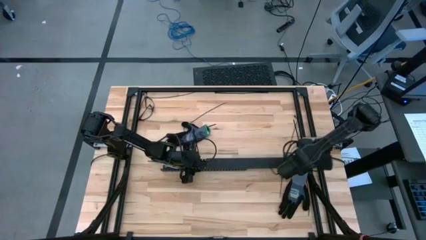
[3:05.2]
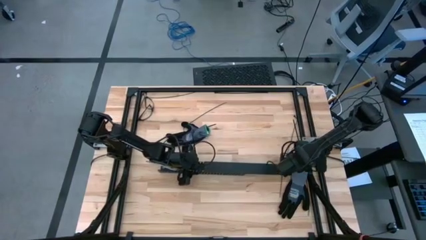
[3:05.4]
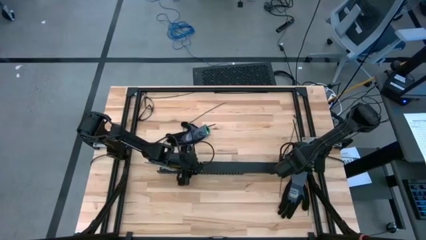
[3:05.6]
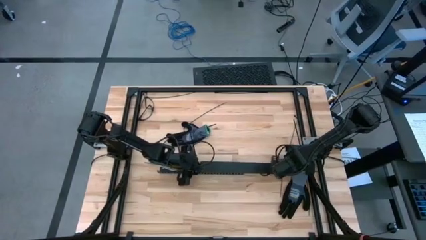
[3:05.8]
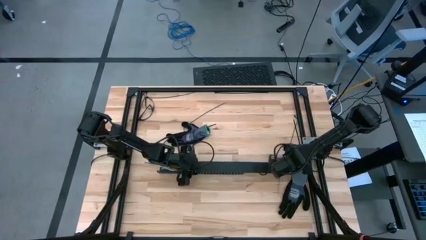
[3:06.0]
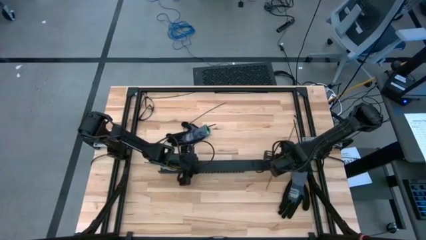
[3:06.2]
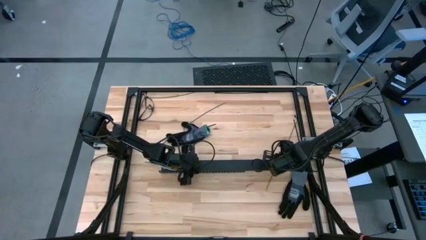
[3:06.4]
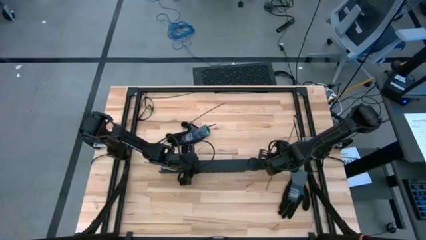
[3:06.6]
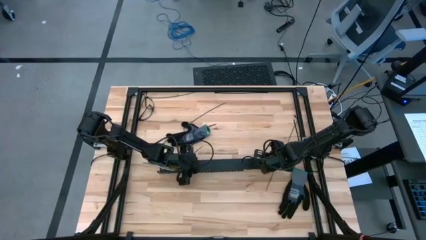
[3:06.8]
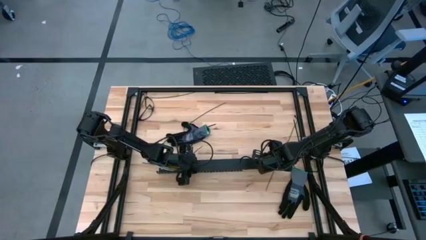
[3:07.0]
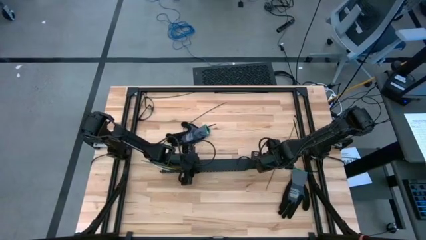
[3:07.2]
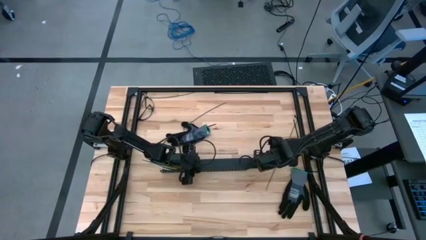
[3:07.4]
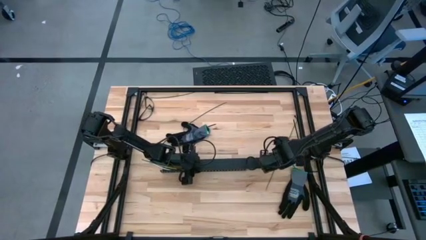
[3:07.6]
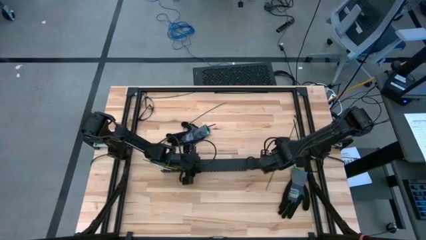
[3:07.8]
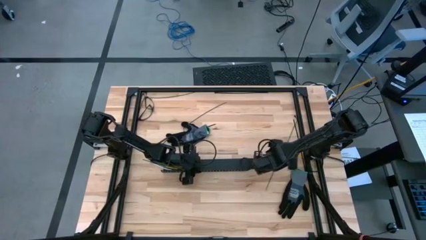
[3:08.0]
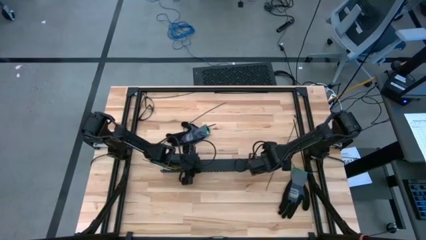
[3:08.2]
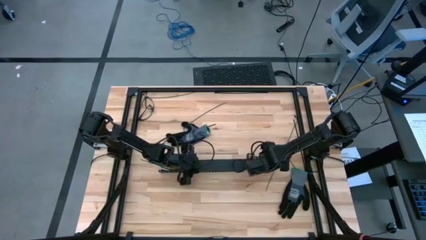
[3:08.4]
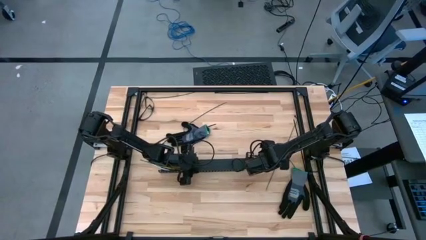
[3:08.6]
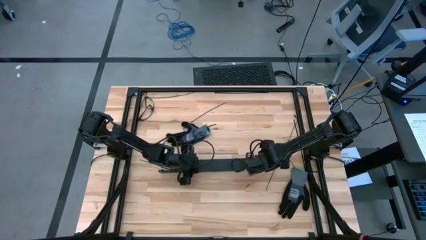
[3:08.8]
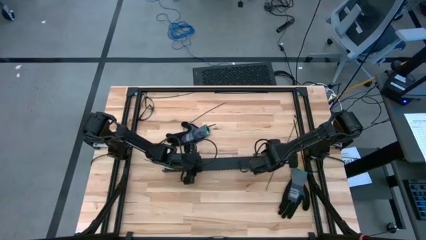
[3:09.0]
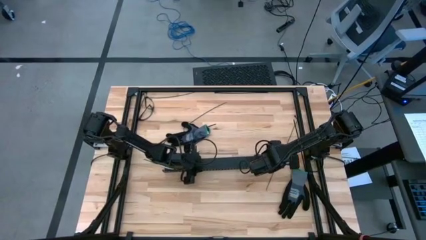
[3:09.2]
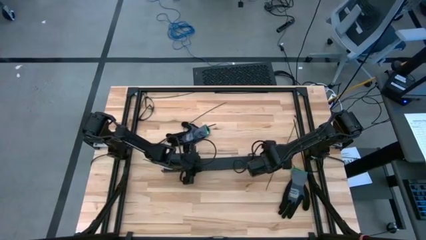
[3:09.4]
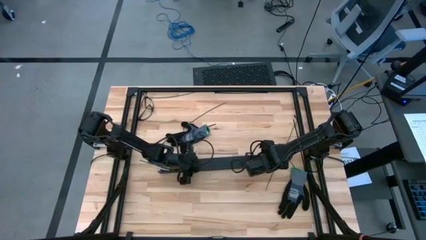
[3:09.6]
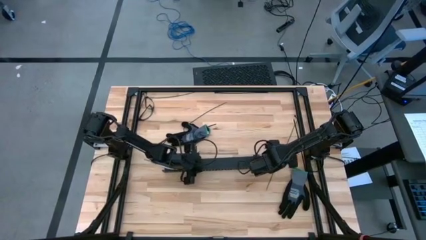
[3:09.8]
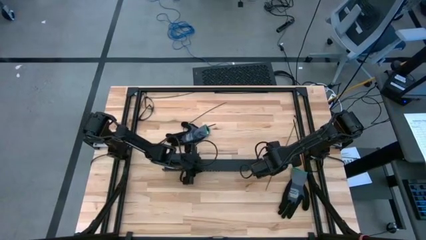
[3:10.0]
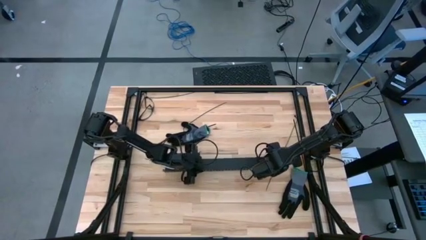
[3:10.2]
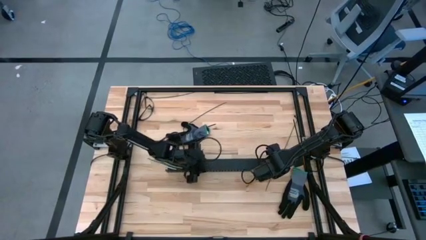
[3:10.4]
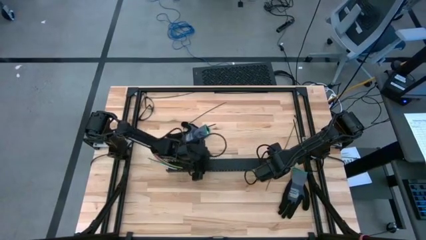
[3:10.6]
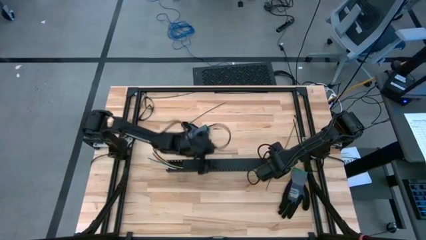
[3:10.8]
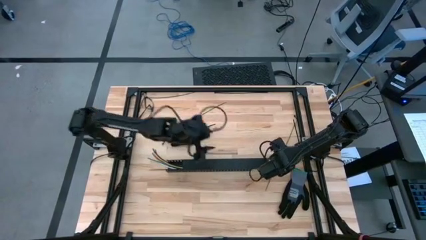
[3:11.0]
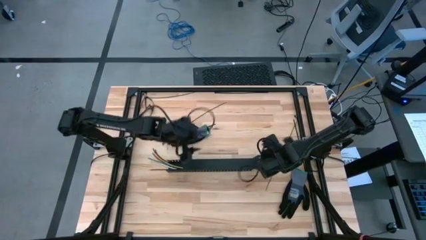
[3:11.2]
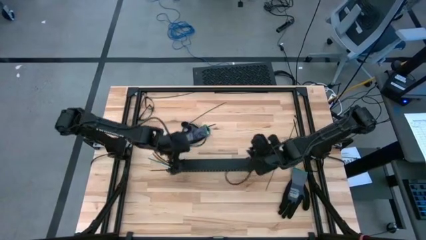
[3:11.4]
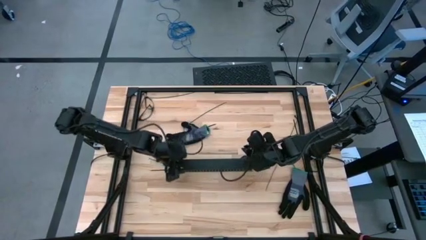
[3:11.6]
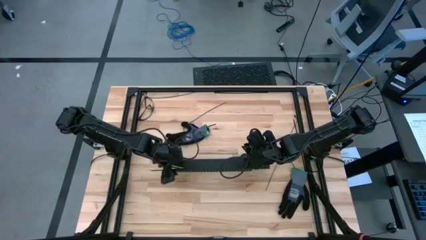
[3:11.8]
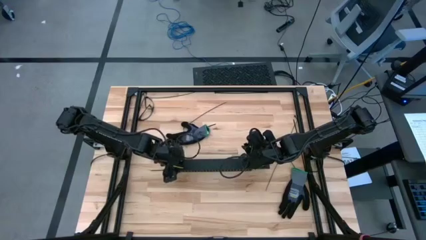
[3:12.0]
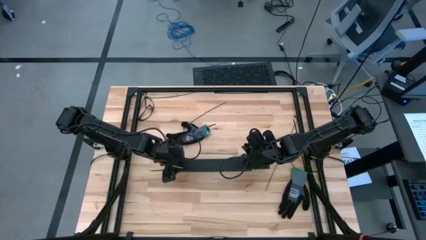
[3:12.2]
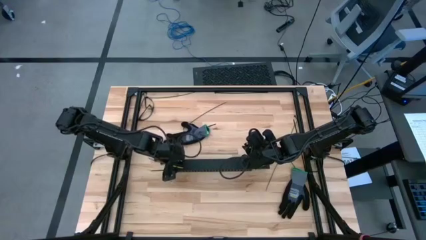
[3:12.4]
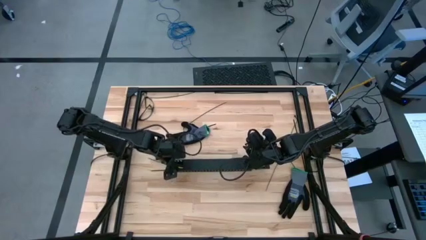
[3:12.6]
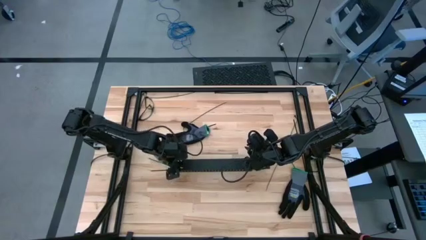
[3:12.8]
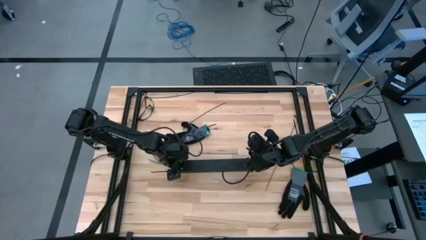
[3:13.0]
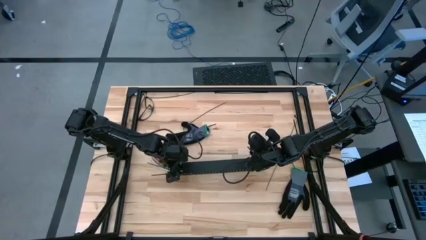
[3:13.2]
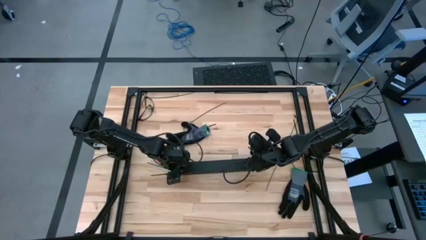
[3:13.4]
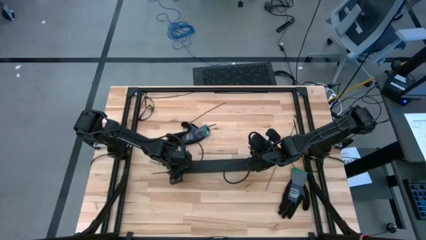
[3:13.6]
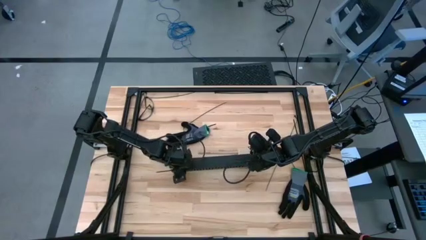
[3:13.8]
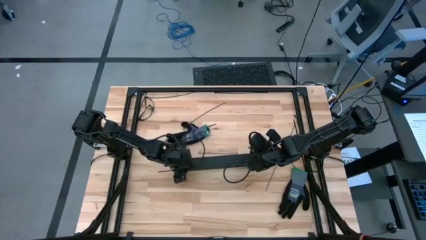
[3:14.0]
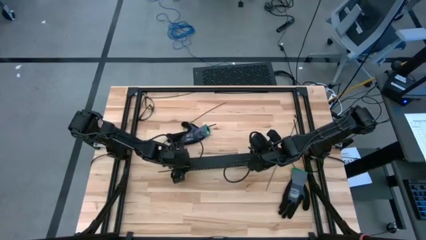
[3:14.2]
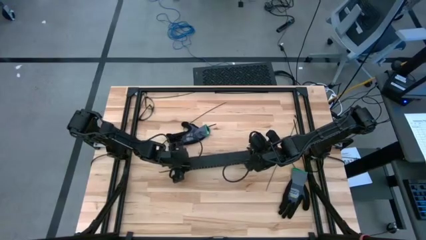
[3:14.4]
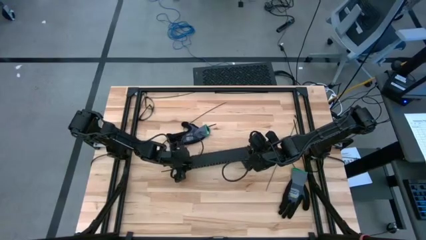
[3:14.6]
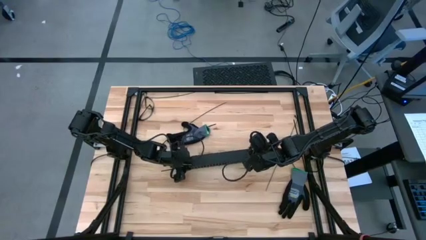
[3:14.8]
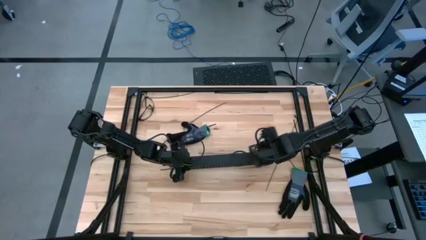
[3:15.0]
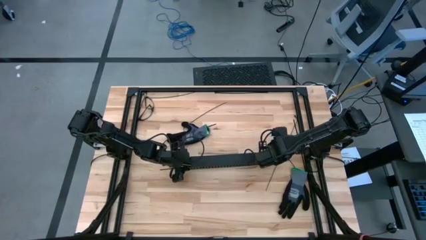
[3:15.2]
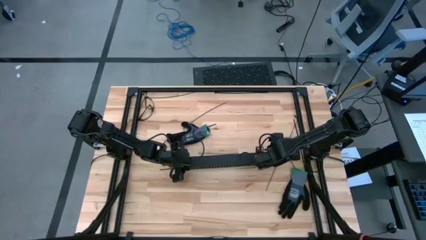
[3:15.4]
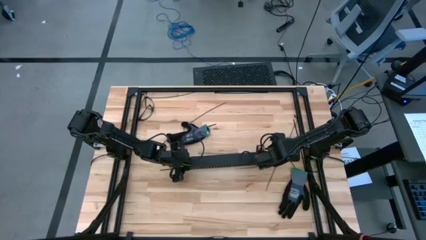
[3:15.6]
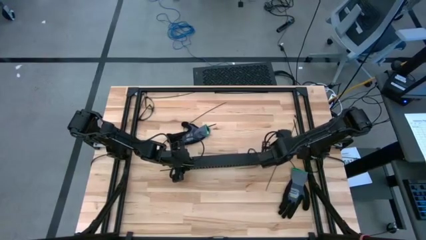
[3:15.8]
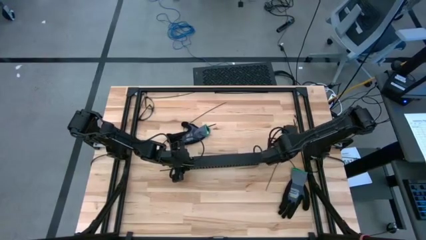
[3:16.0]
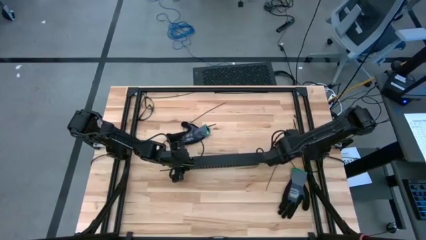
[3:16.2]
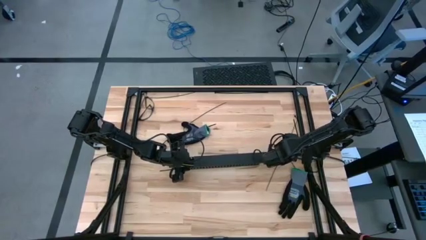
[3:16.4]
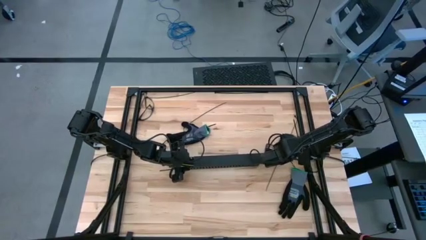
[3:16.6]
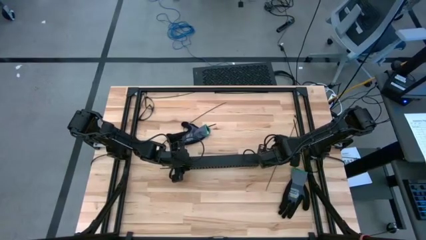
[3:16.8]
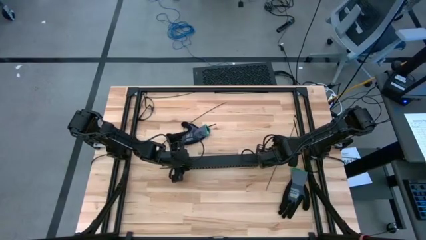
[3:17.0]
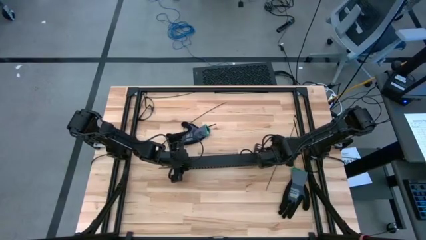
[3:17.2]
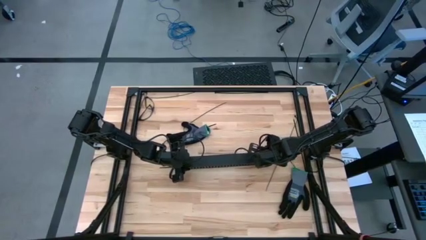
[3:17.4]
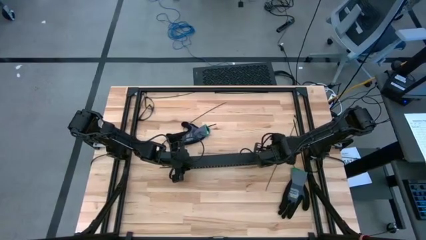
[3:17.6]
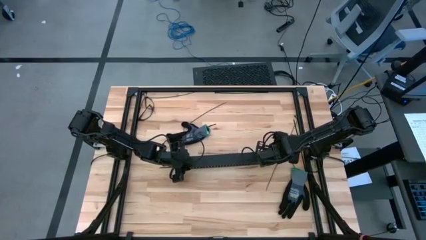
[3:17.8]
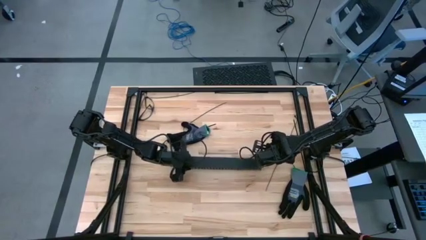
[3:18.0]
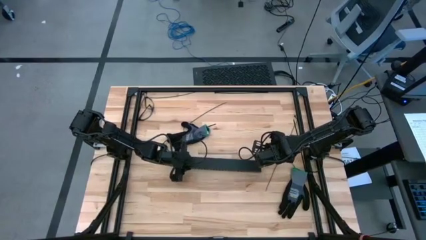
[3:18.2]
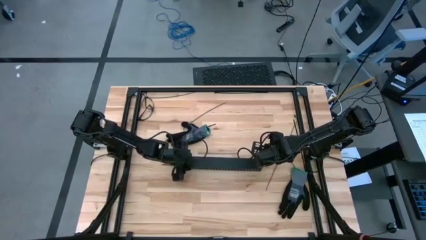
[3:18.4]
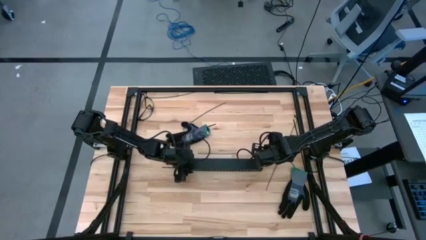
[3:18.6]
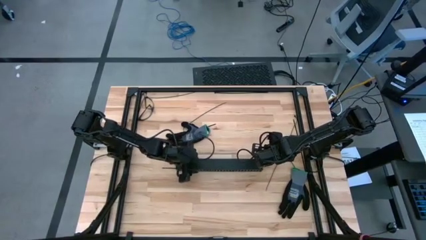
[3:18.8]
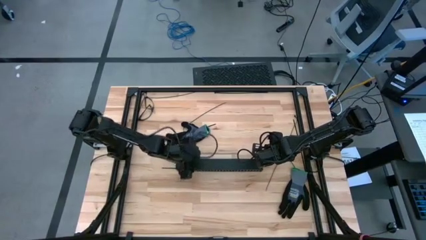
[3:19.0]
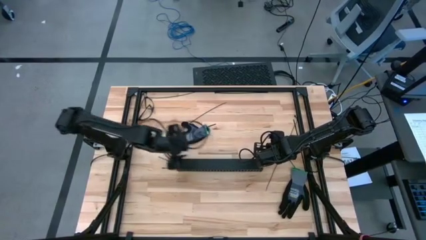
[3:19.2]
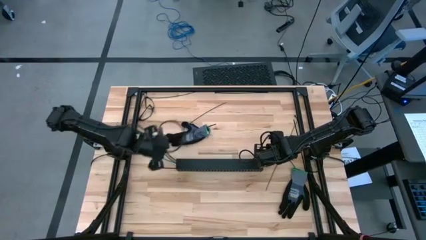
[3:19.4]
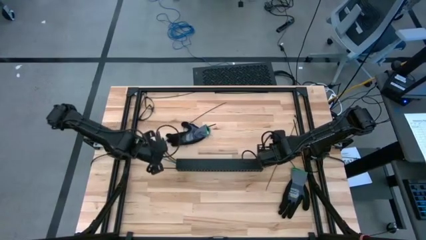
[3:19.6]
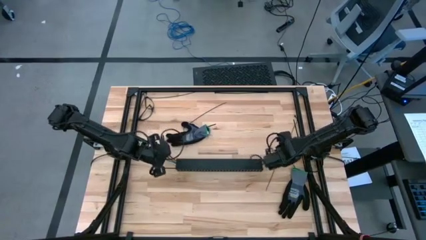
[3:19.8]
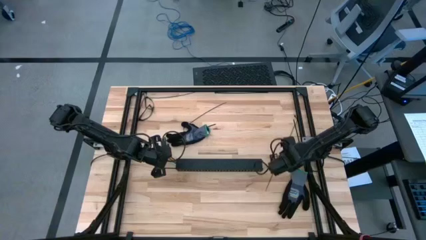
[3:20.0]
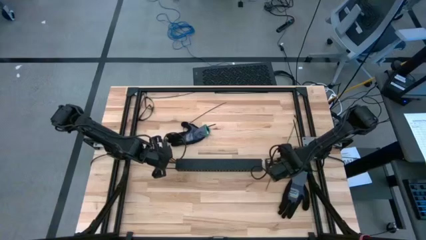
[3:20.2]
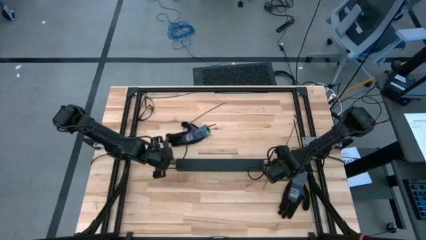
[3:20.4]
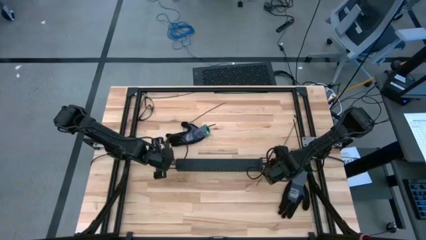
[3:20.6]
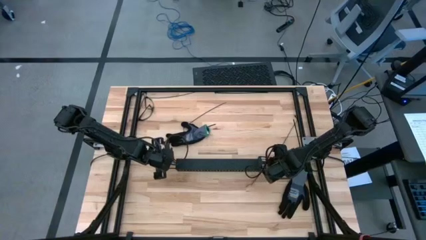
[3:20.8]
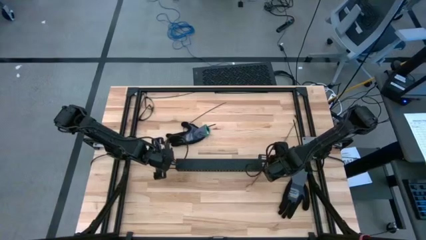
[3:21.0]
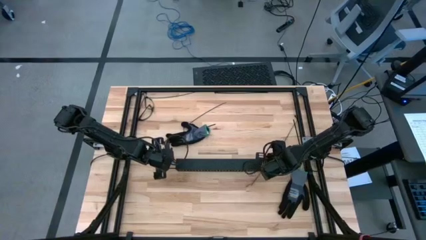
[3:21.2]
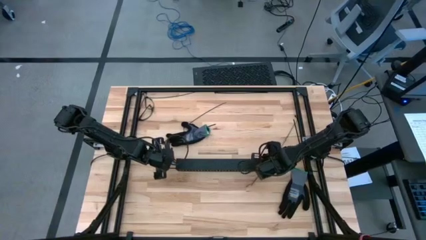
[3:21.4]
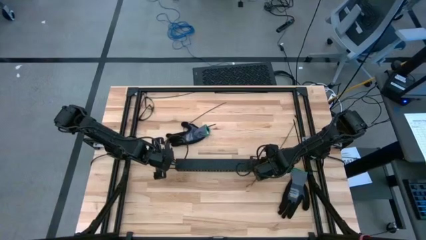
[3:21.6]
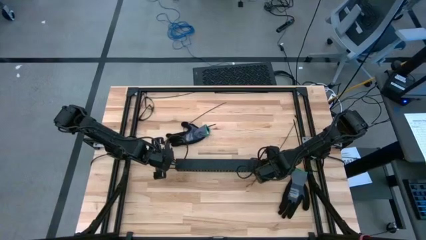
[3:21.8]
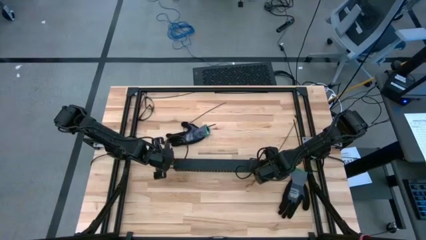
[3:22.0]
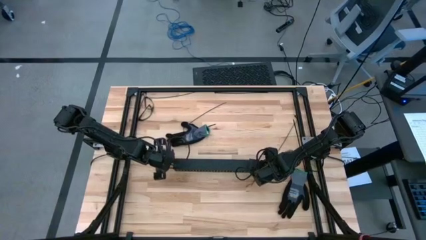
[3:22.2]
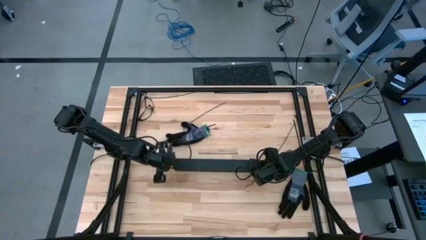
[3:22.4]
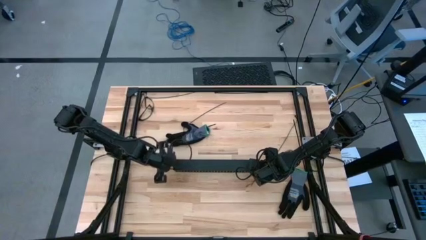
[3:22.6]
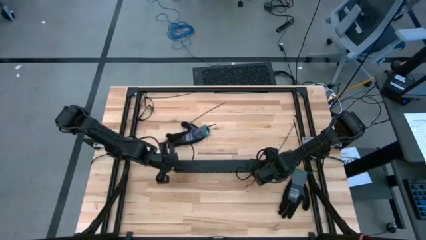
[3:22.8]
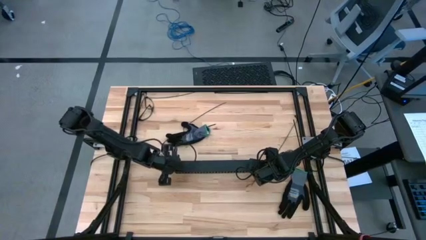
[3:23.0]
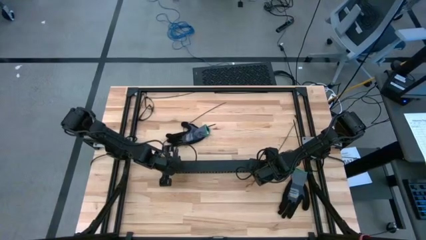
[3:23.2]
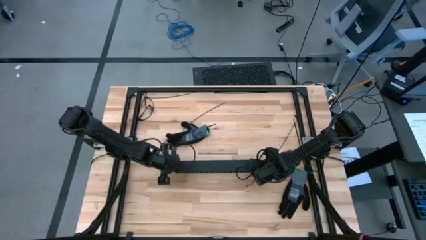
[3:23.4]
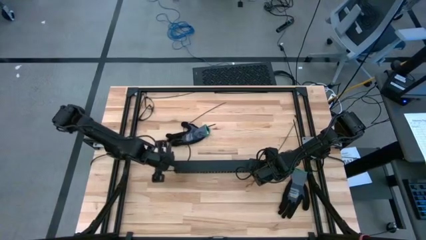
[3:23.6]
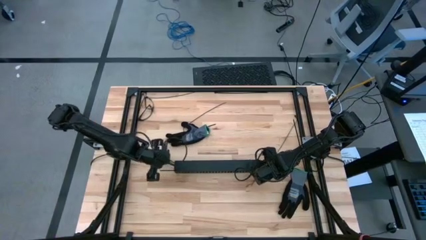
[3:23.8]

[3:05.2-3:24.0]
Task: Ziptie cables
Close the black cable duct lid
